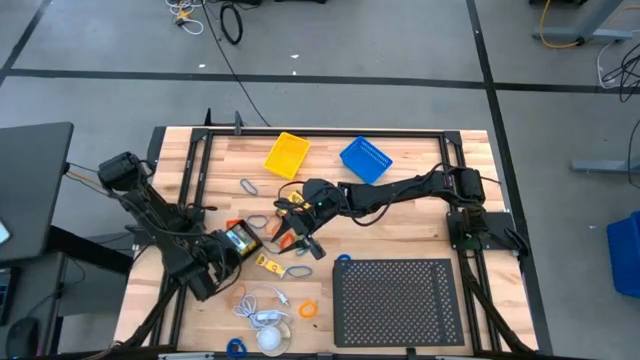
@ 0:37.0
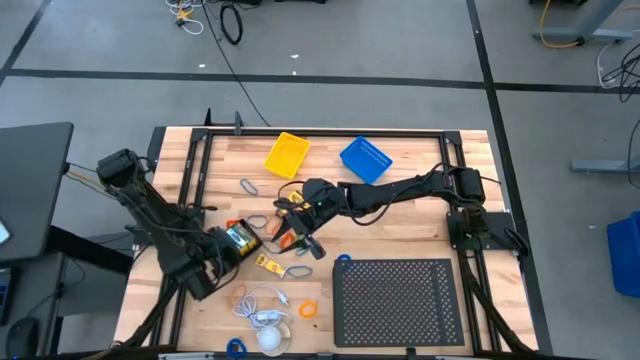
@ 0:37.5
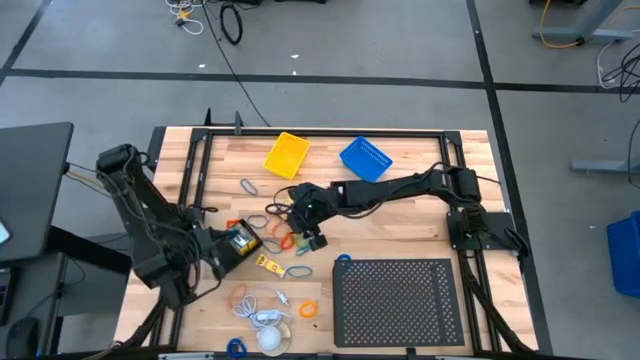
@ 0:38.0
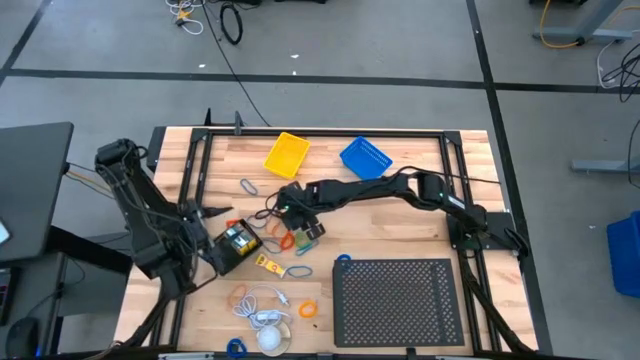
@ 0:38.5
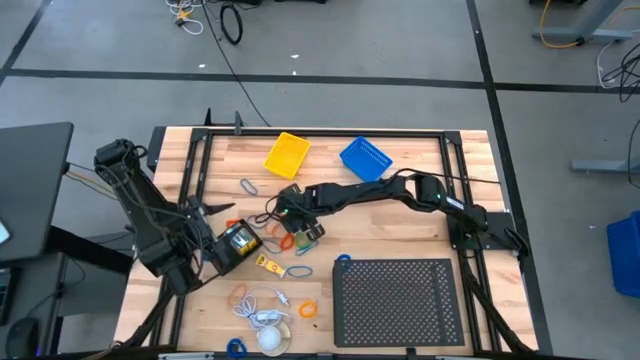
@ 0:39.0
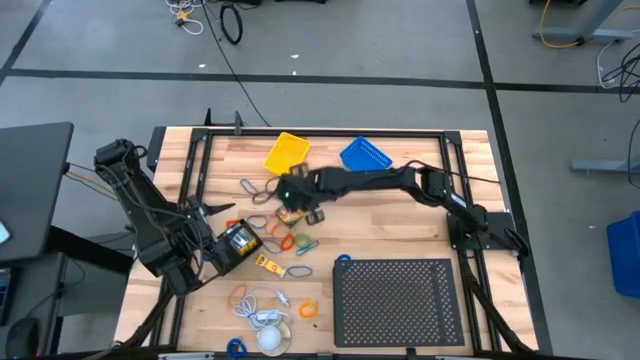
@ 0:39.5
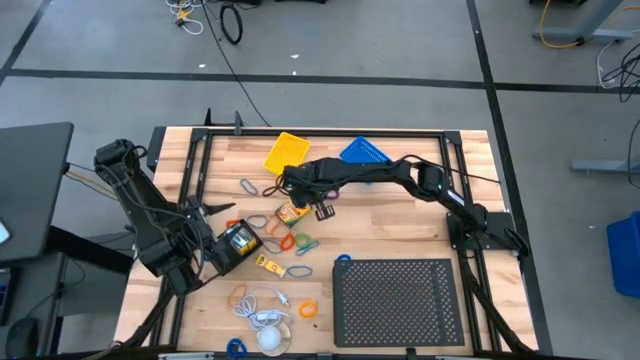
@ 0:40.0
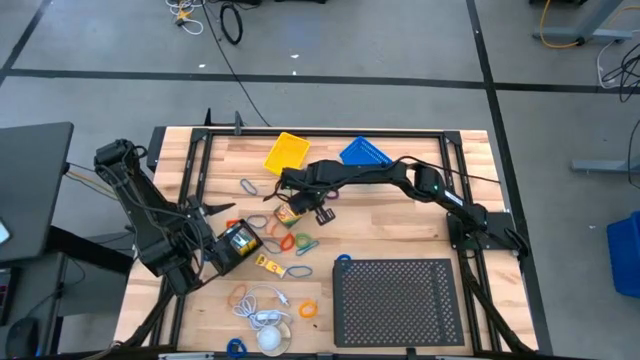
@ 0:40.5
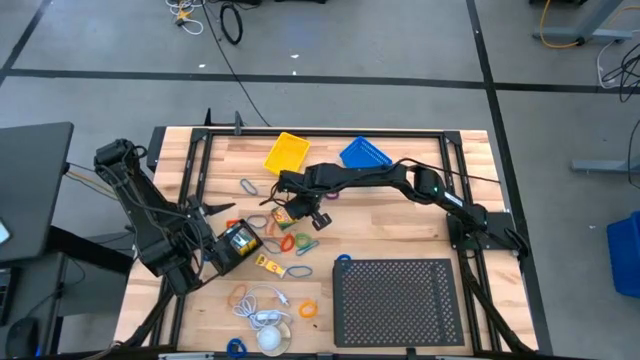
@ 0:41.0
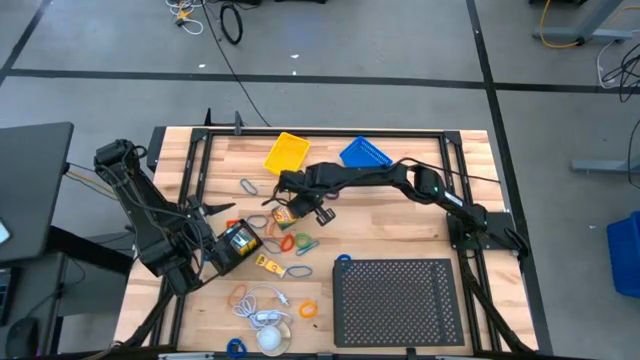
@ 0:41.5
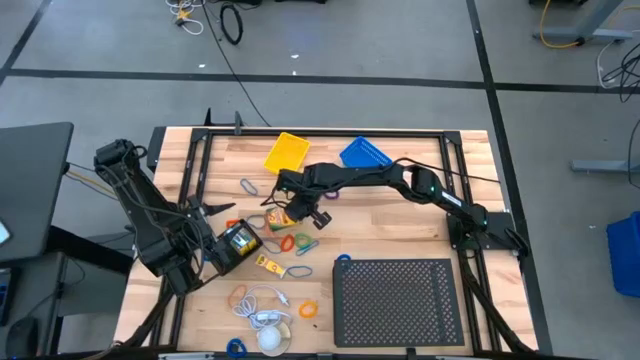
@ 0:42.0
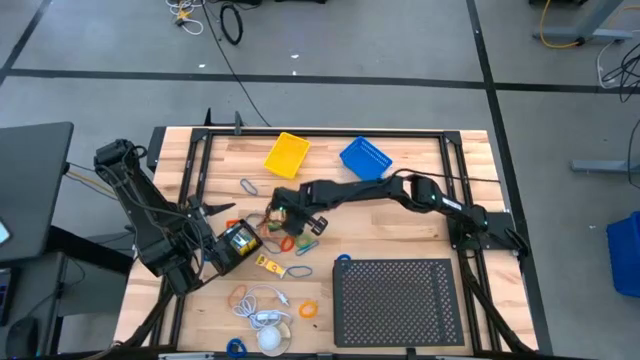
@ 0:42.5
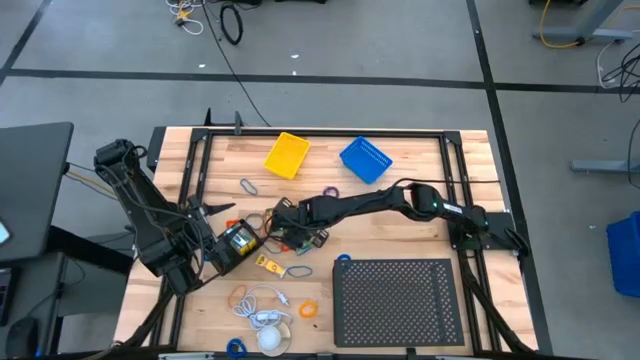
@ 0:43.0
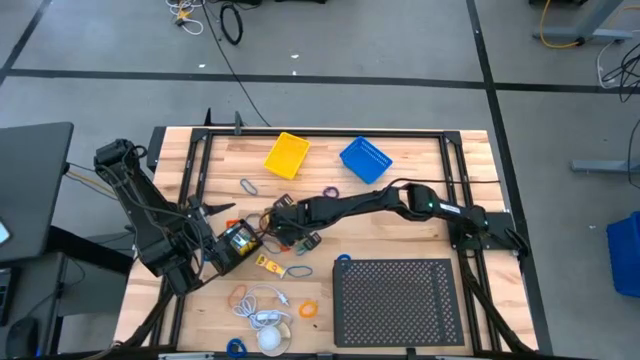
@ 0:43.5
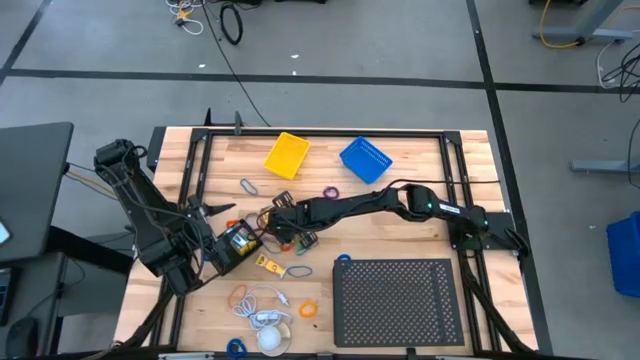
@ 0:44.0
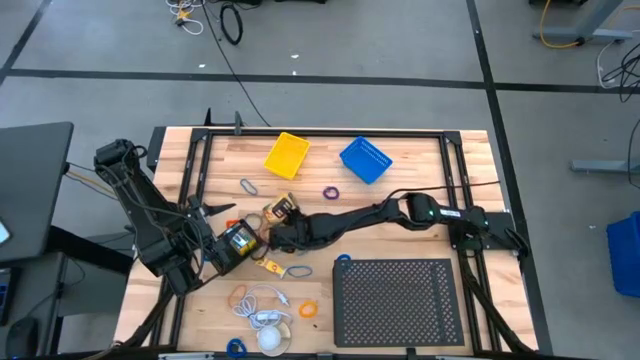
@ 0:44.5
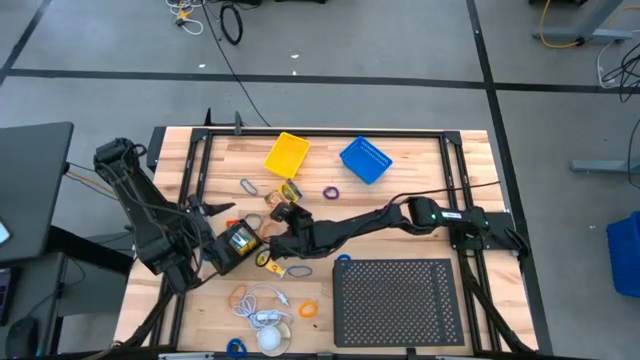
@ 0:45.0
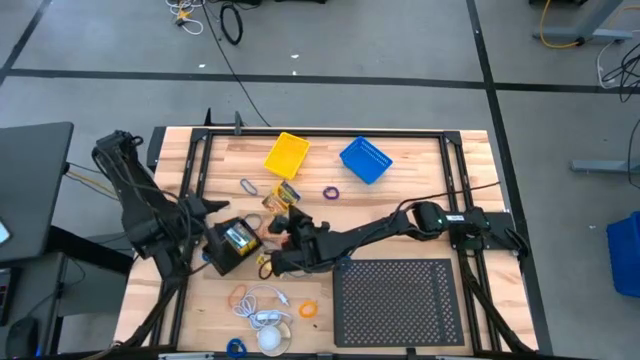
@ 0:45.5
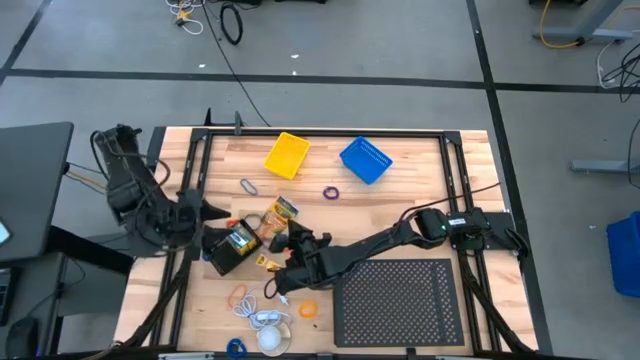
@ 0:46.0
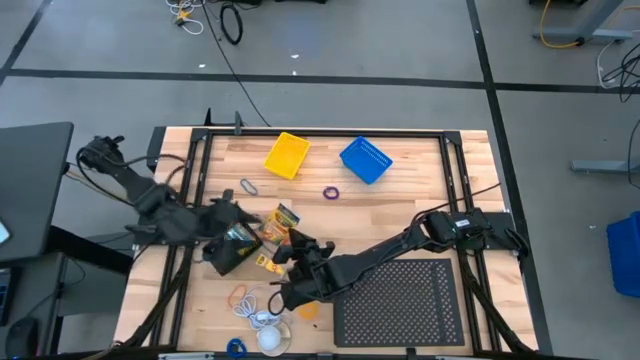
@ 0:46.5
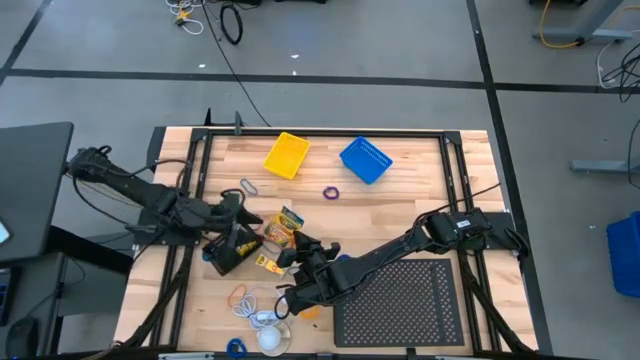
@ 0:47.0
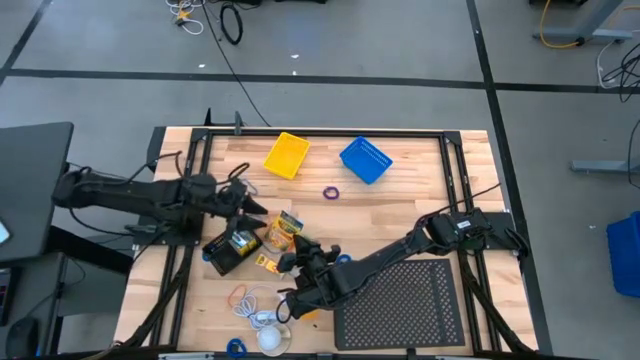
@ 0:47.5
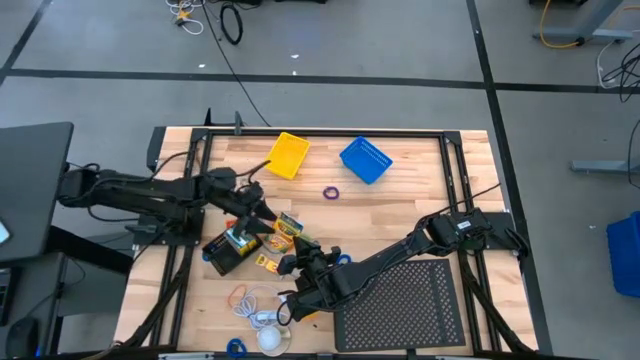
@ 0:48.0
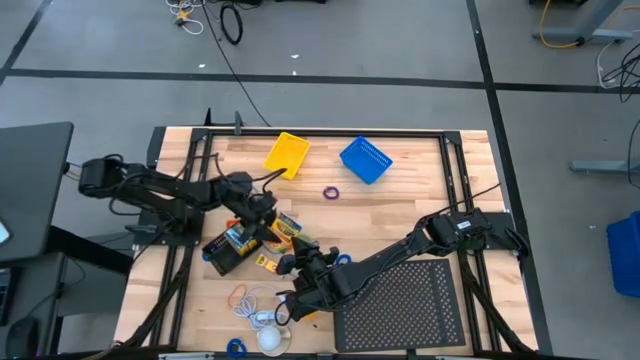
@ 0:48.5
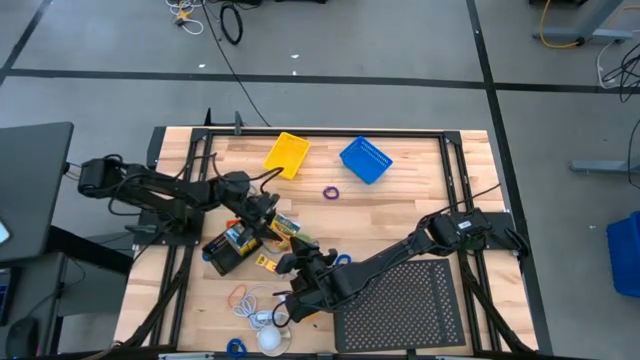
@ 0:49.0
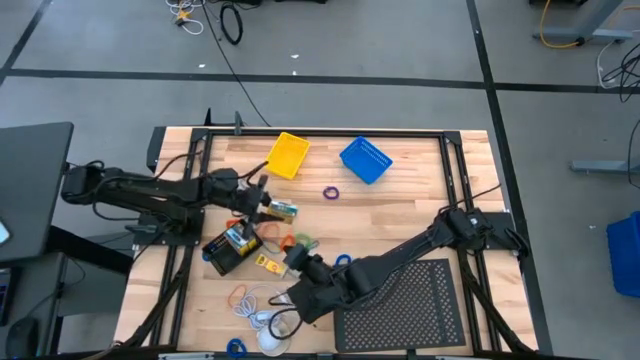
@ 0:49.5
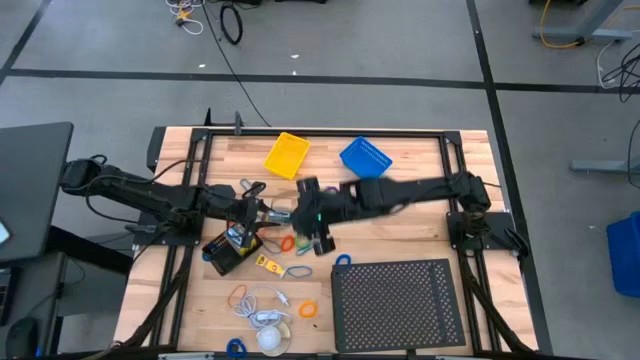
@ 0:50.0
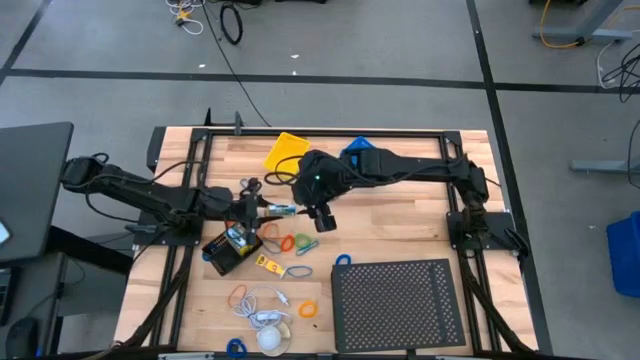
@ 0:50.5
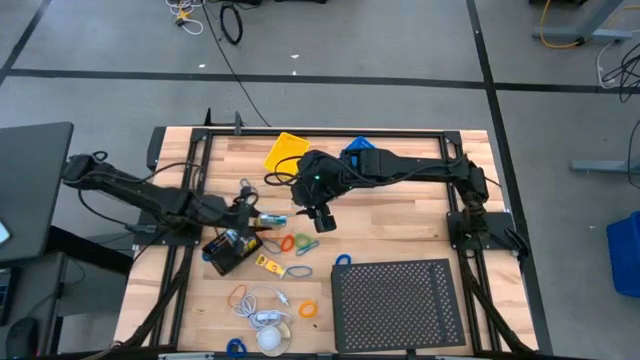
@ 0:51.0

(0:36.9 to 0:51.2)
Task: Pick & Place Office Desk Supplies
Put the crayon box into the black basket
